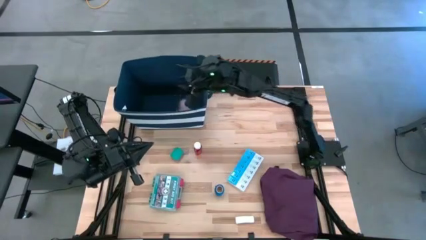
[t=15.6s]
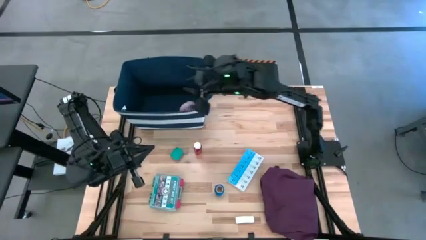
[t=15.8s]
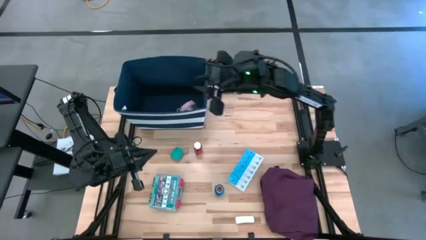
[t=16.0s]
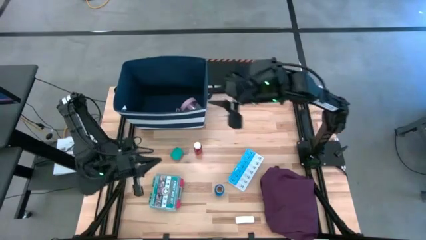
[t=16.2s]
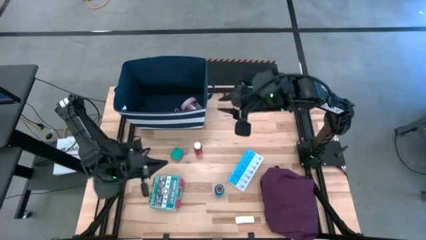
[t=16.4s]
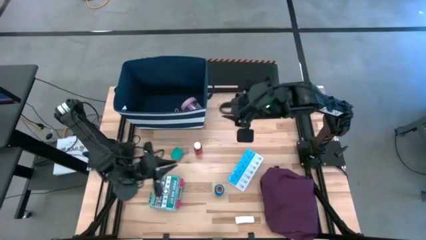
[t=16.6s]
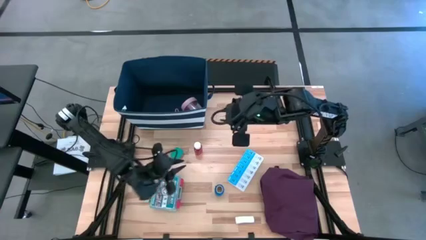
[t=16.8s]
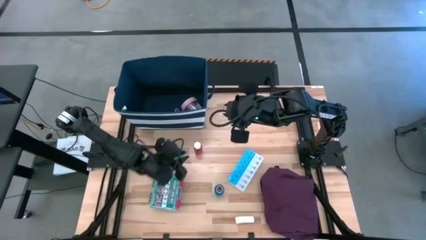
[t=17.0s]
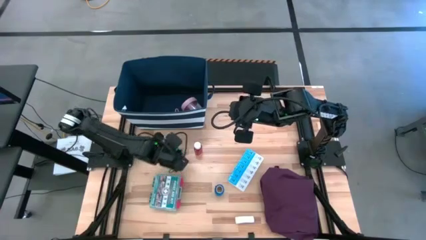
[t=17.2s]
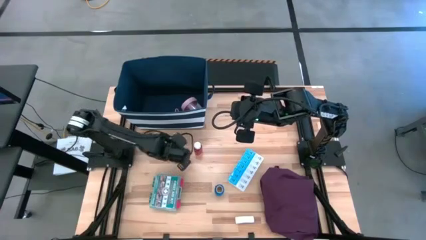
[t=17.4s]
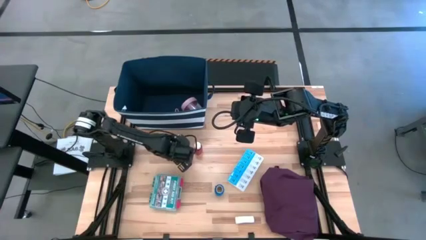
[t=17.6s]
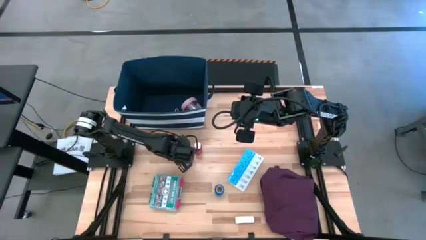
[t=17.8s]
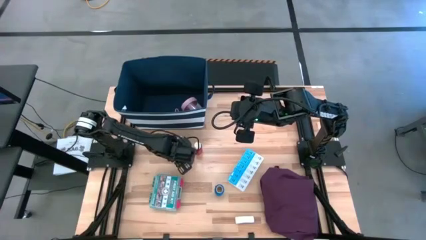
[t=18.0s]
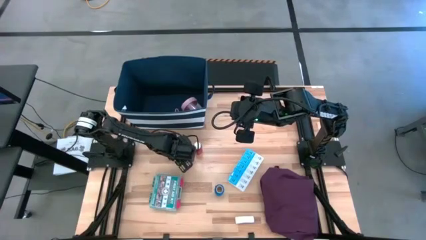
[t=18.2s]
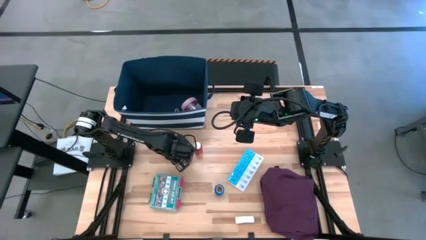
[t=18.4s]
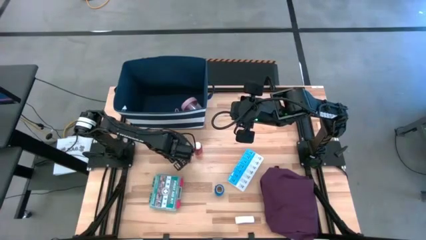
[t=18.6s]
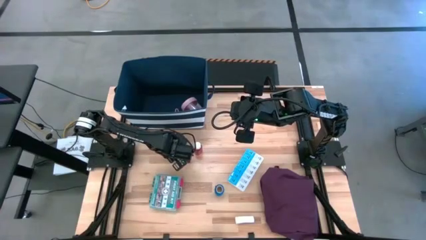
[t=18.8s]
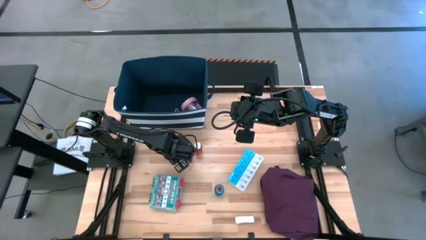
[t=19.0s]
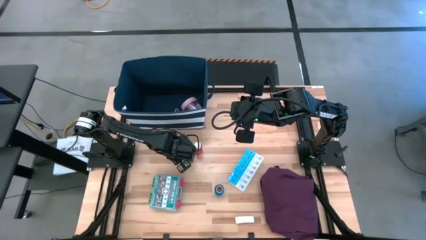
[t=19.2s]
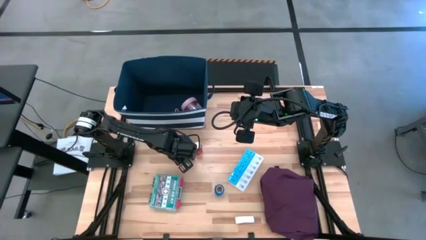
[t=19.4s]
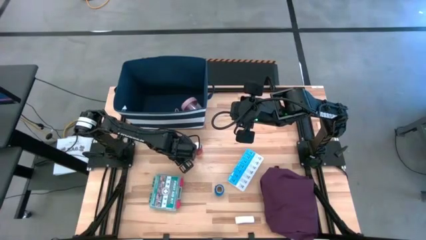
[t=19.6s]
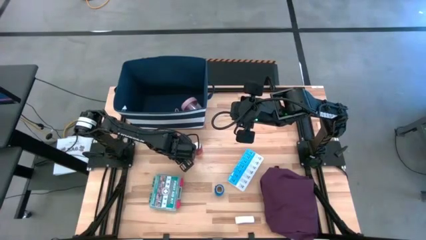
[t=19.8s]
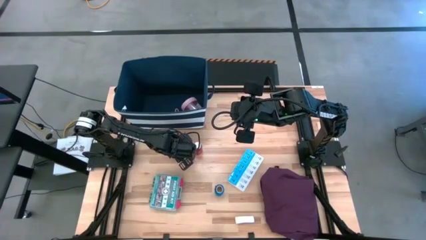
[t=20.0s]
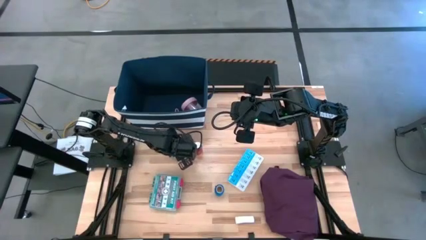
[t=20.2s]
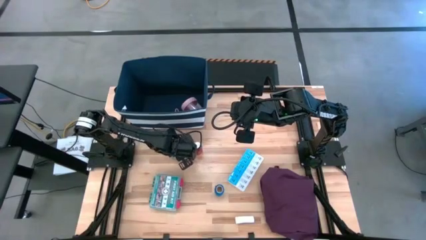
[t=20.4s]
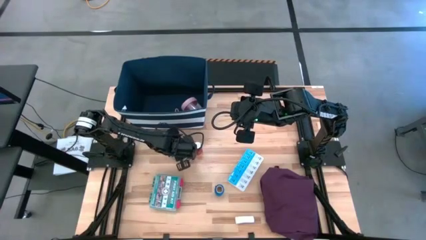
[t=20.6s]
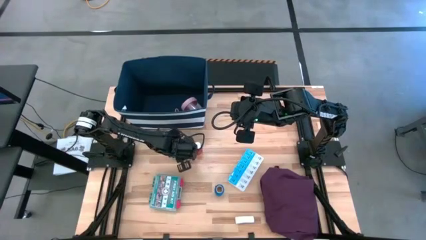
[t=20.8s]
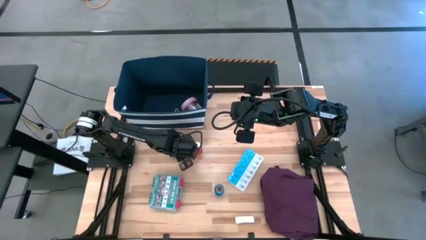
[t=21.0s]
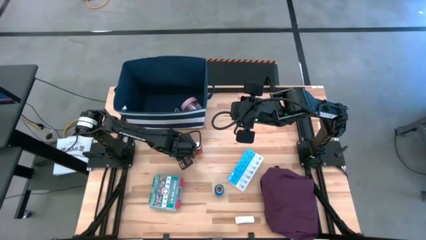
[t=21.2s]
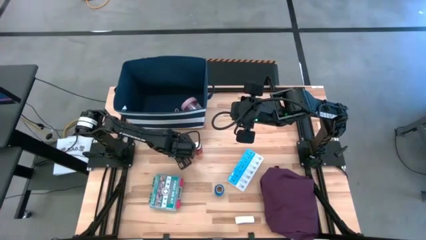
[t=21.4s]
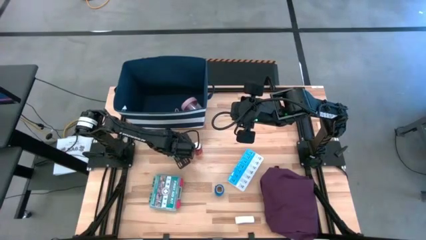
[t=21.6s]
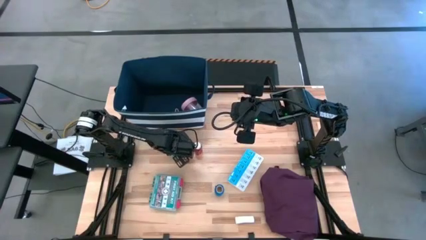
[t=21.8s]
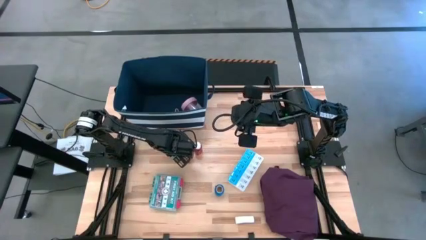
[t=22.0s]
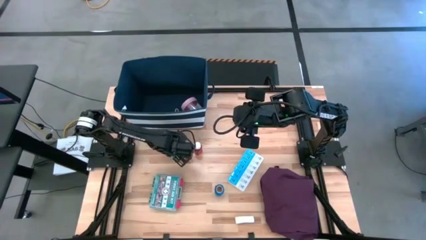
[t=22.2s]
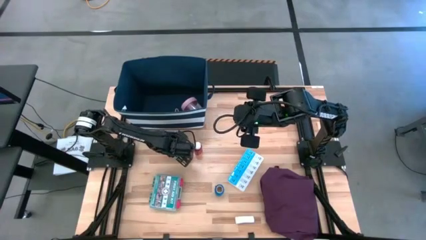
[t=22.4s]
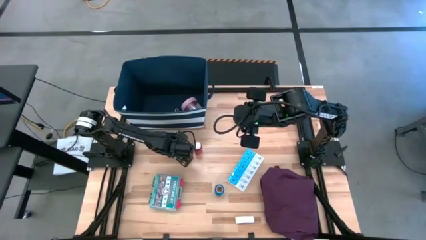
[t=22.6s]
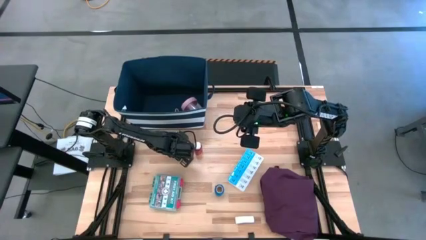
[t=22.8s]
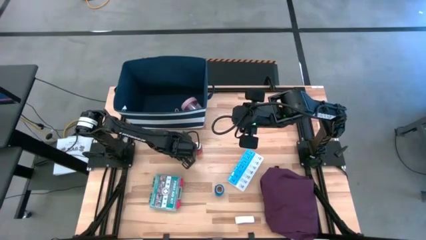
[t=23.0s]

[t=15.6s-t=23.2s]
Task: Pick & place medical supplies in basket/bin
Put the green bandage into the blue bin

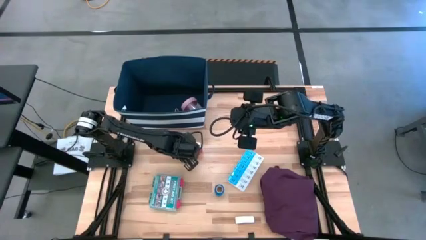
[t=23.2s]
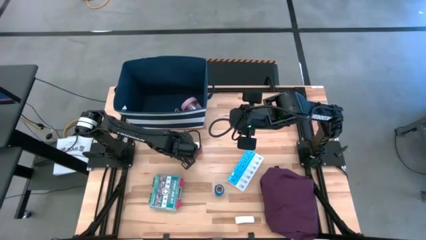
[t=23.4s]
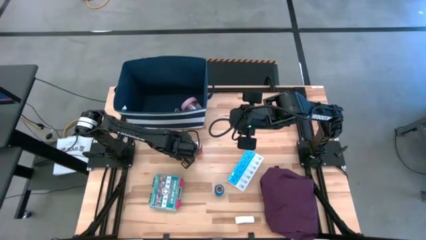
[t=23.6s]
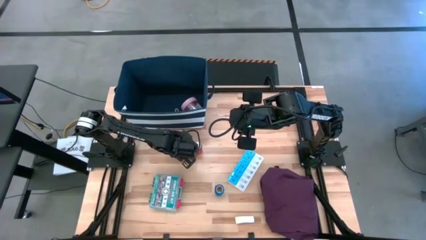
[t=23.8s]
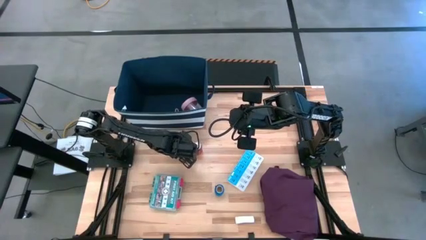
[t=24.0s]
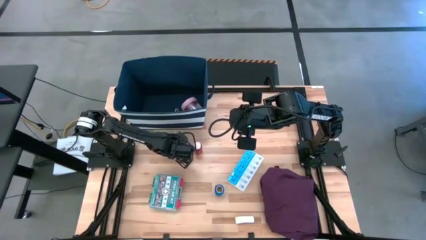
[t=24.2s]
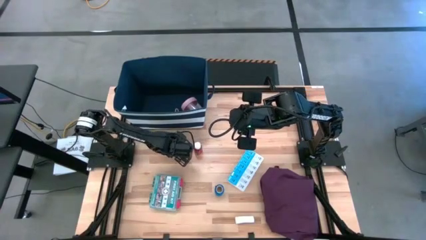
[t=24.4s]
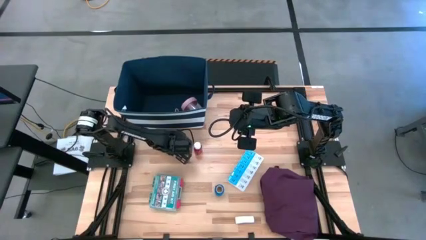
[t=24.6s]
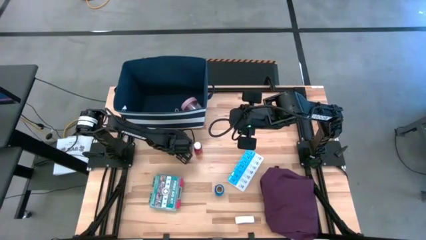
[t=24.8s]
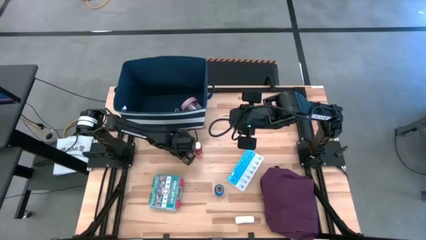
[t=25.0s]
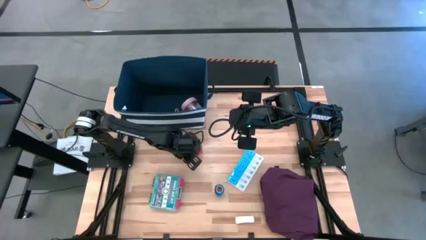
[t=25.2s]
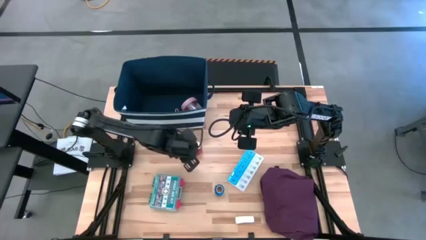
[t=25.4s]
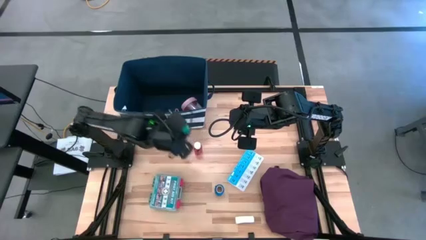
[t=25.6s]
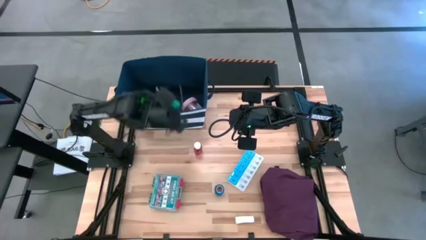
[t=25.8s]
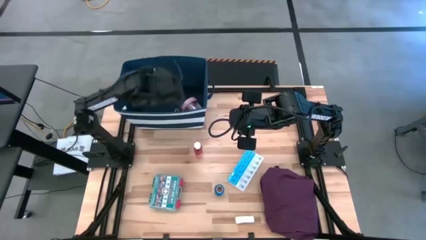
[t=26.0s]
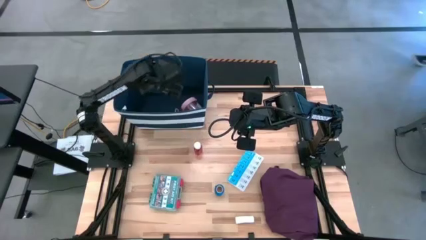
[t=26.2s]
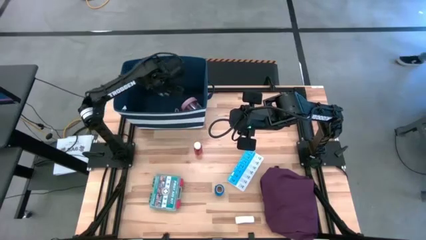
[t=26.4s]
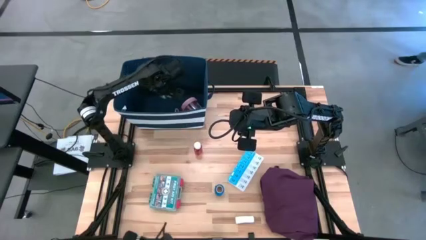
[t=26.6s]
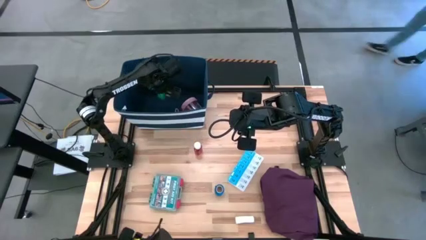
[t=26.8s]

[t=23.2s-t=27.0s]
Put the green bandage into the blue bin

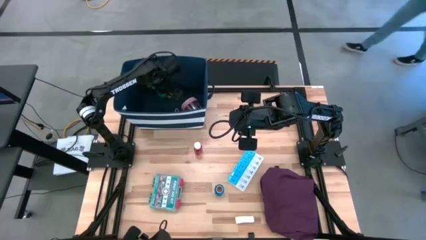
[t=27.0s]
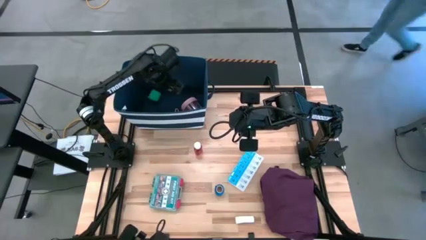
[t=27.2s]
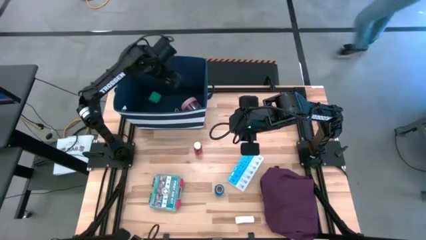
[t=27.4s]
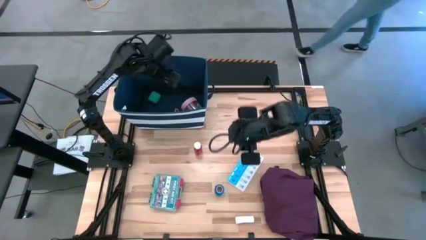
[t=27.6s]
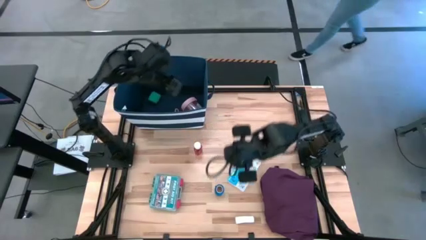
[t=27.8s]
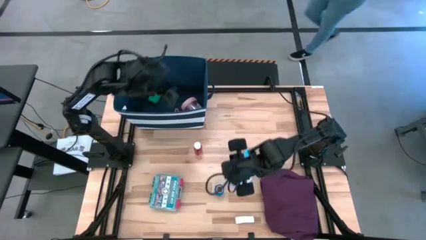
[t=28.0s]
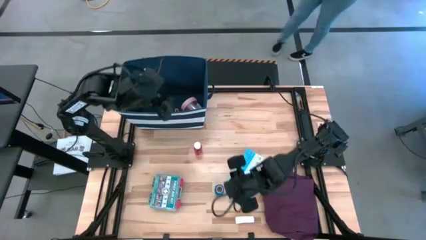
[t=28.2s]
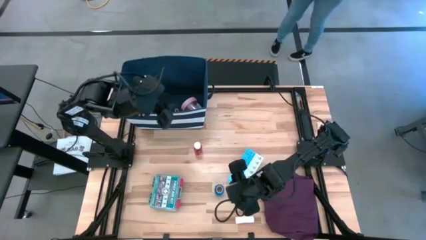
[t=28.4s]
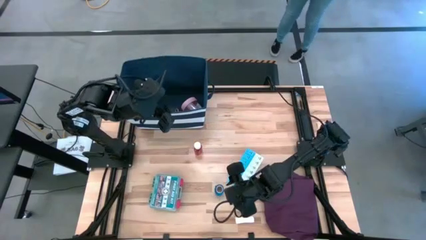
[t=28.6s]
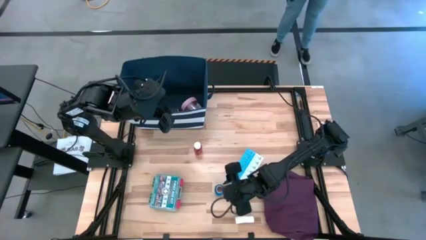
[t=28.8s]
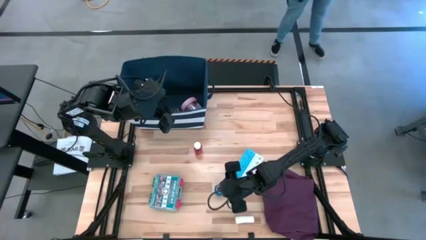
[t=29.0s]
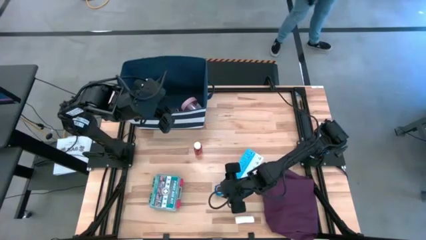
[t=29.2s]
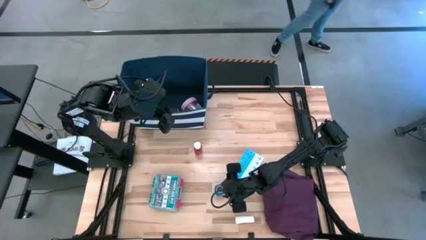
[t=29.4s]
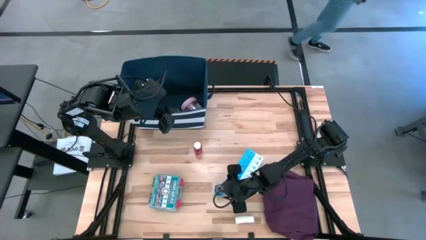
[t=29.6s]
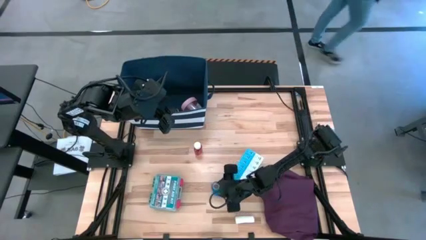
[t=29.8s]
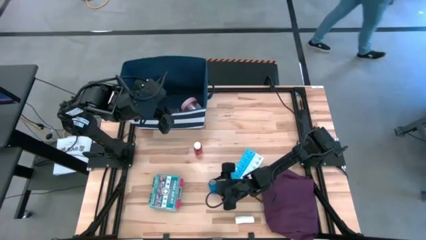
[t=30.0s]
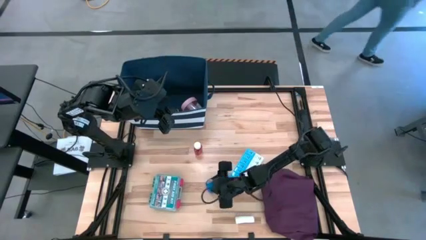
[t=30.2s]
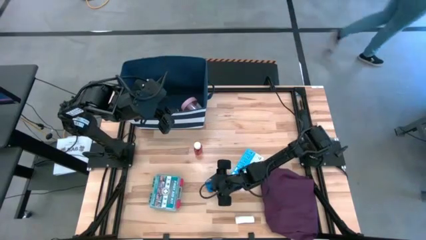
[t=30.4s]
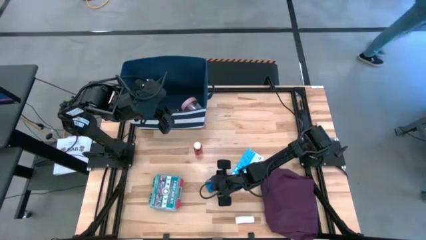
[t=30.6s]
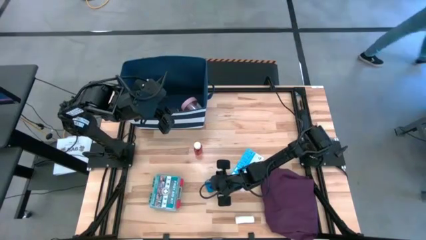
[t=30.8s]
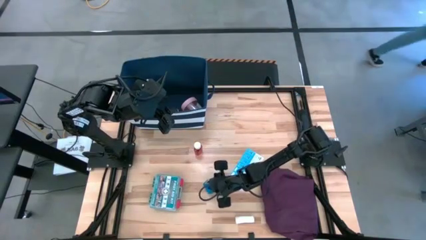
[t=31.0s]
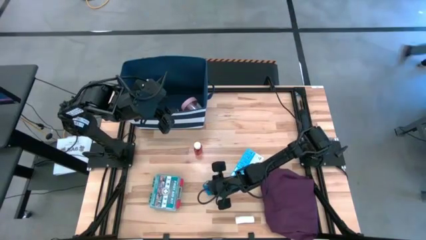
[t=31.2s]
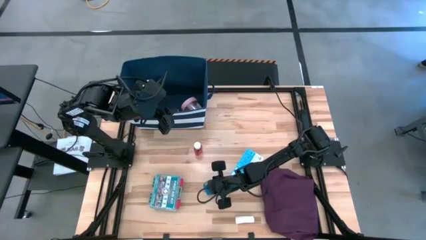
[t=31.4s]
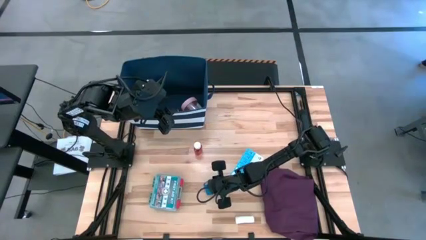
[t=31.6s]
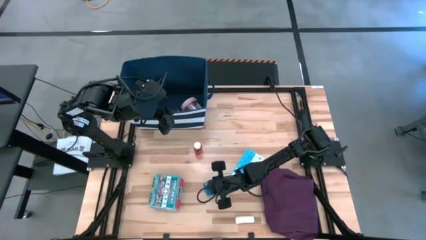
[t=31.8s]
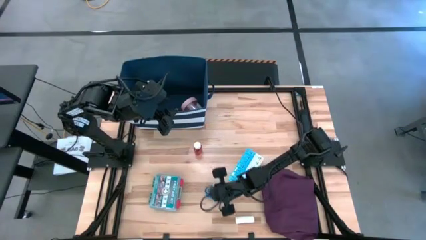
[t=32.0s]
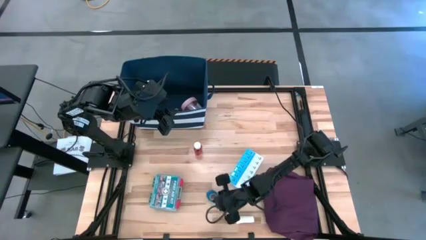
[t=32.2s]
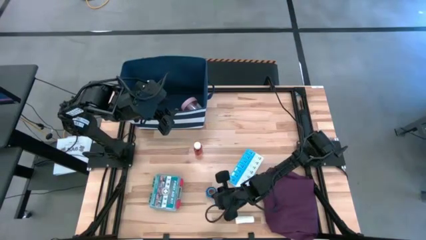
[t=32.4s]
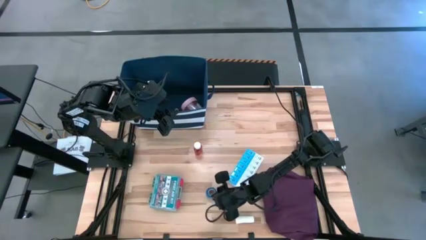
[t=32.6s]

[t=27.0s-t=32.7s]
Put the blue bandage into the blue bin
